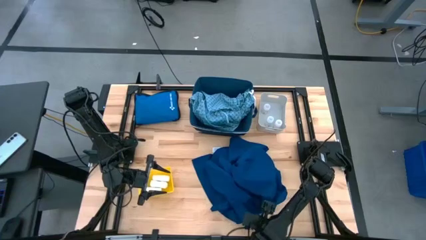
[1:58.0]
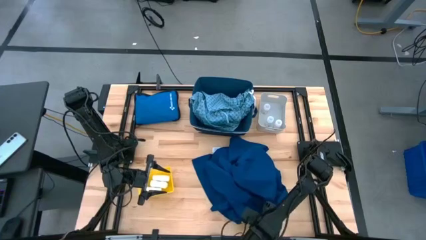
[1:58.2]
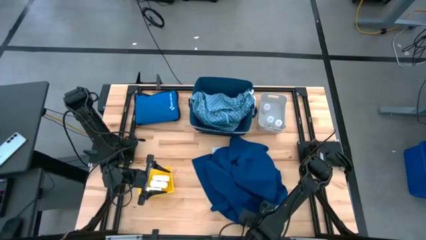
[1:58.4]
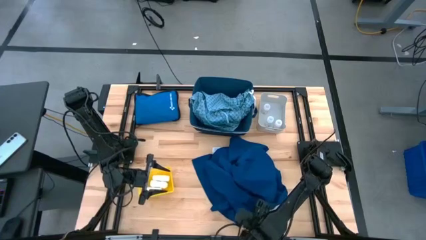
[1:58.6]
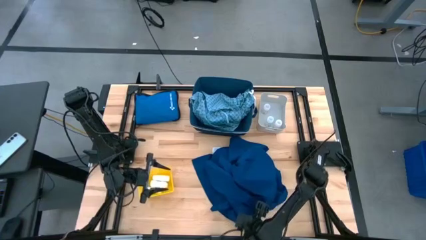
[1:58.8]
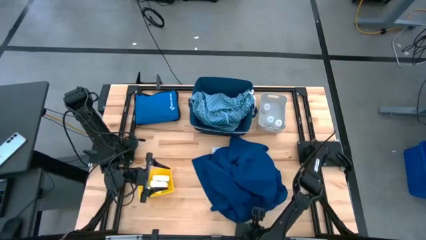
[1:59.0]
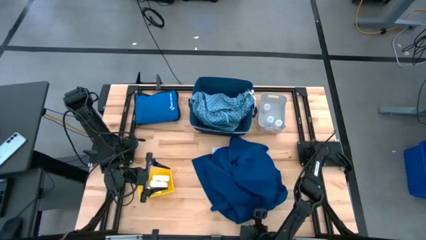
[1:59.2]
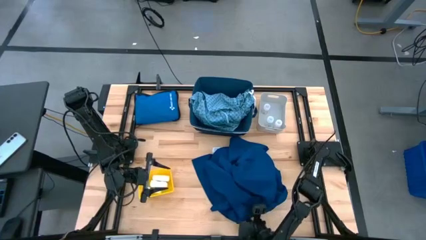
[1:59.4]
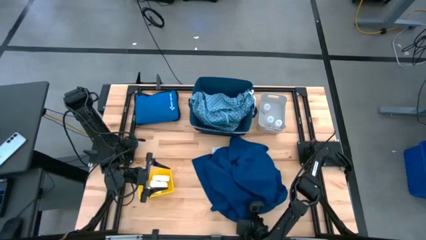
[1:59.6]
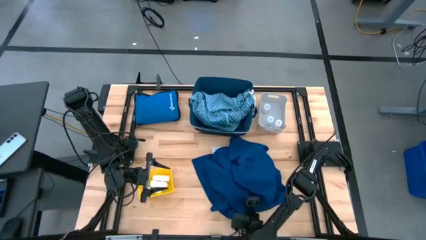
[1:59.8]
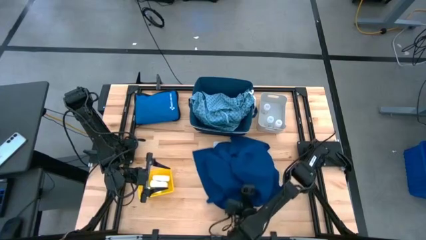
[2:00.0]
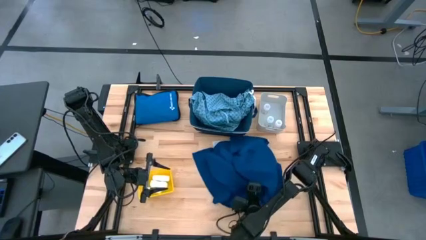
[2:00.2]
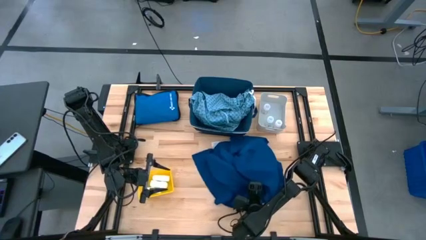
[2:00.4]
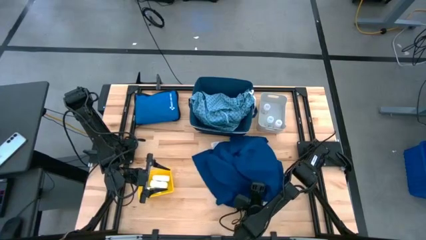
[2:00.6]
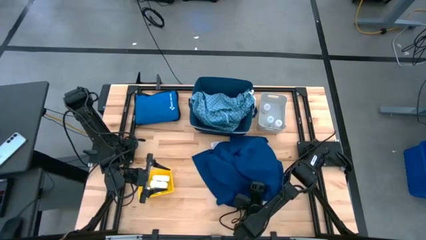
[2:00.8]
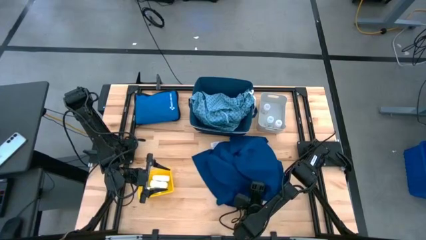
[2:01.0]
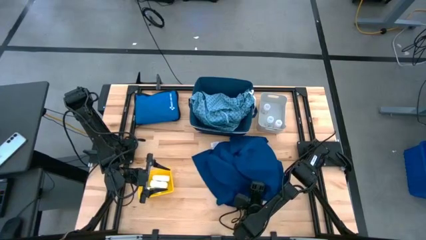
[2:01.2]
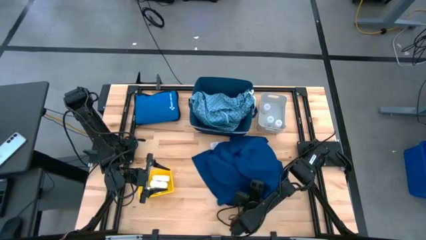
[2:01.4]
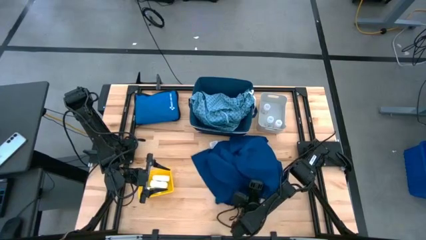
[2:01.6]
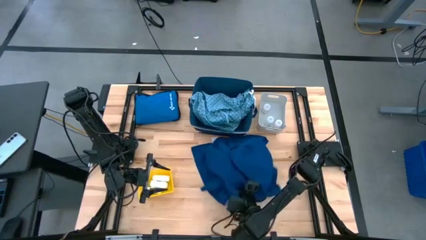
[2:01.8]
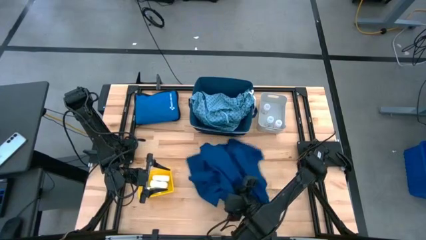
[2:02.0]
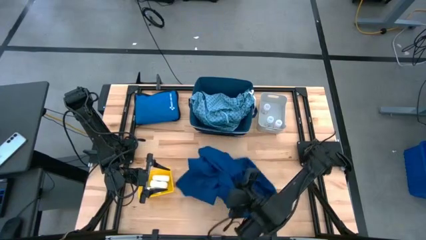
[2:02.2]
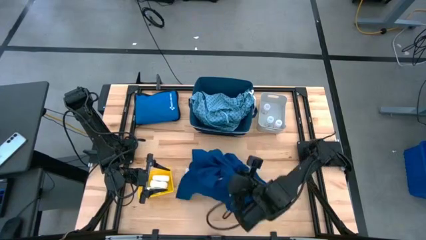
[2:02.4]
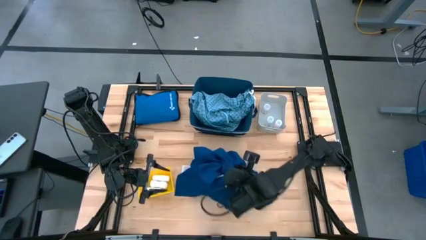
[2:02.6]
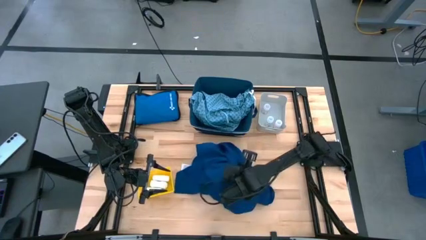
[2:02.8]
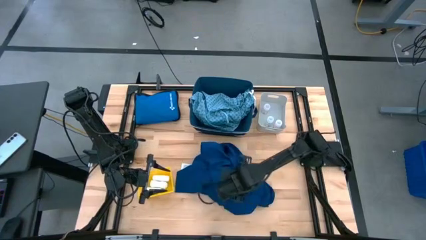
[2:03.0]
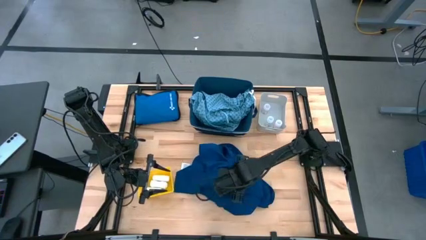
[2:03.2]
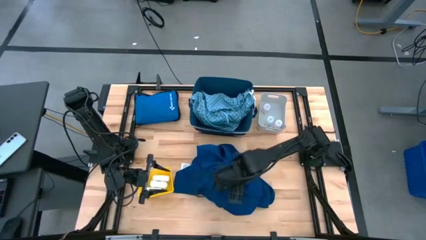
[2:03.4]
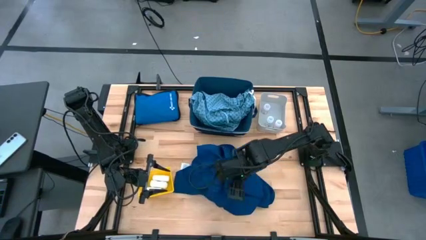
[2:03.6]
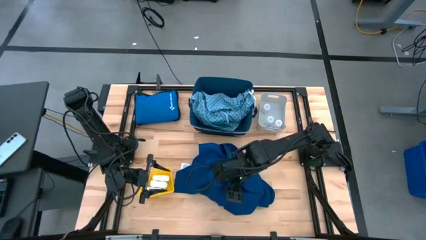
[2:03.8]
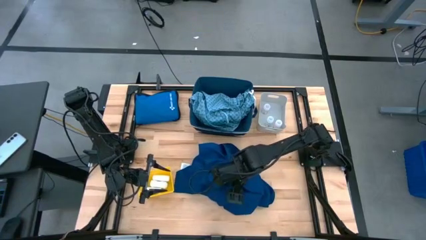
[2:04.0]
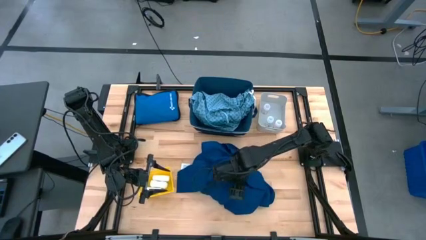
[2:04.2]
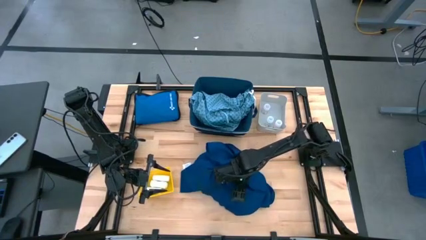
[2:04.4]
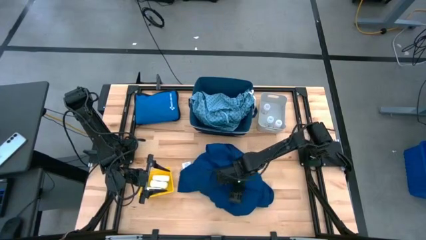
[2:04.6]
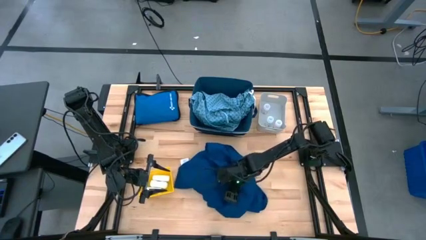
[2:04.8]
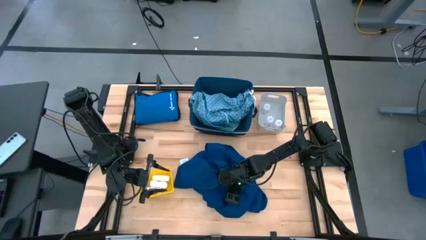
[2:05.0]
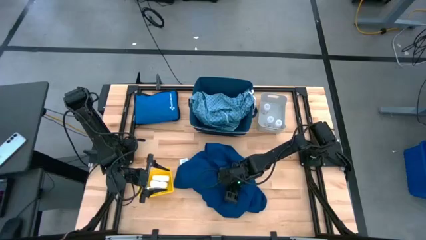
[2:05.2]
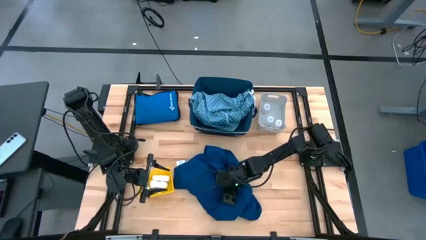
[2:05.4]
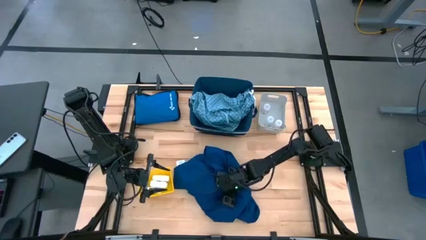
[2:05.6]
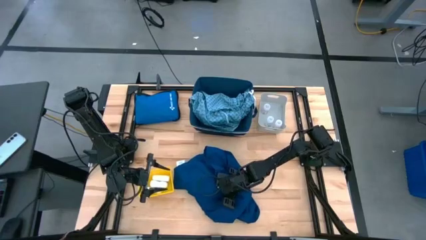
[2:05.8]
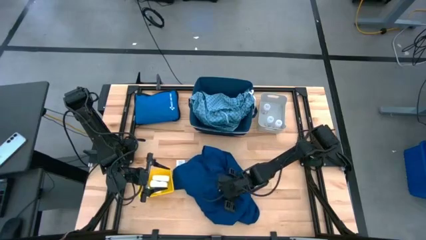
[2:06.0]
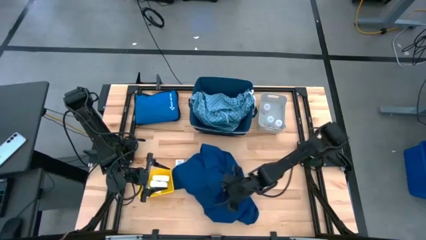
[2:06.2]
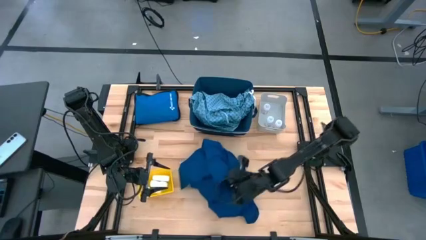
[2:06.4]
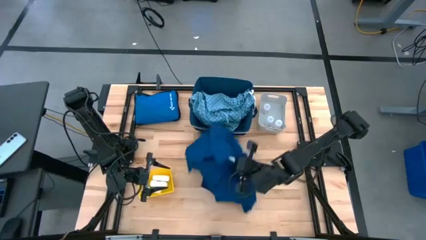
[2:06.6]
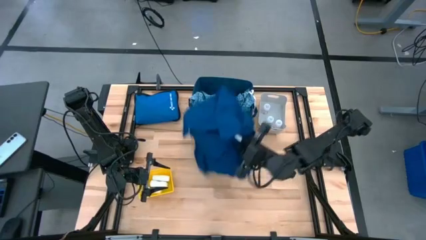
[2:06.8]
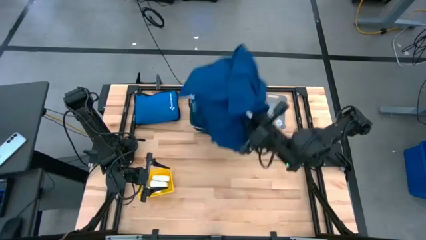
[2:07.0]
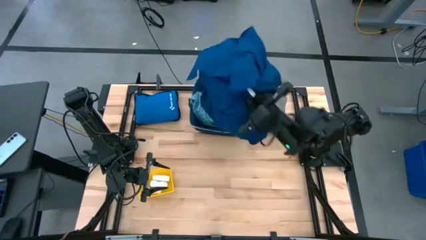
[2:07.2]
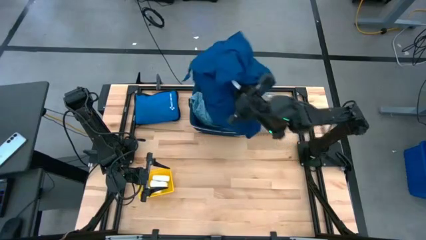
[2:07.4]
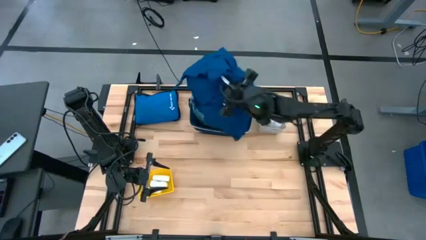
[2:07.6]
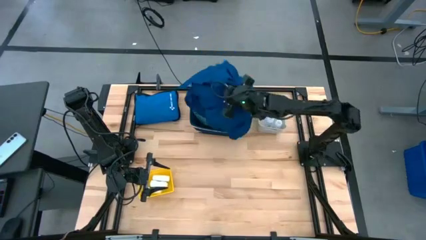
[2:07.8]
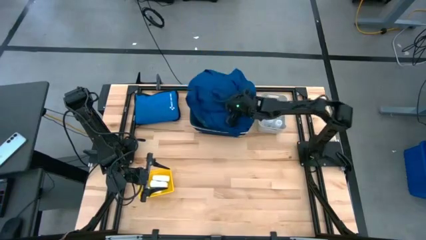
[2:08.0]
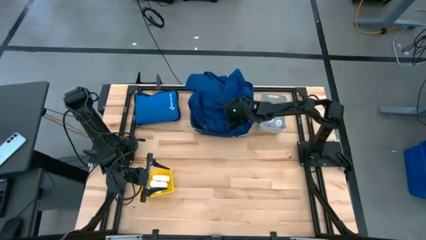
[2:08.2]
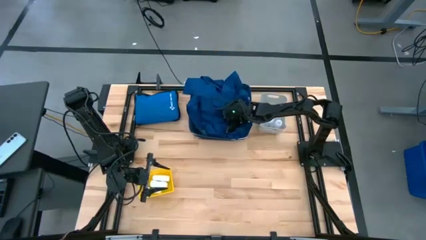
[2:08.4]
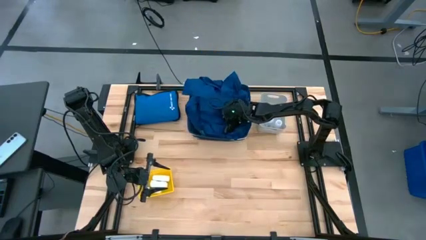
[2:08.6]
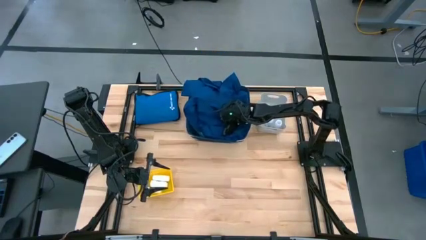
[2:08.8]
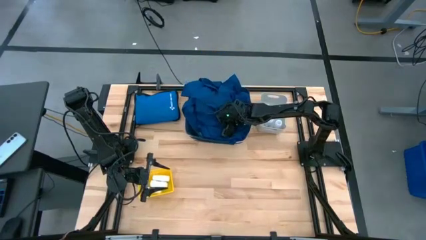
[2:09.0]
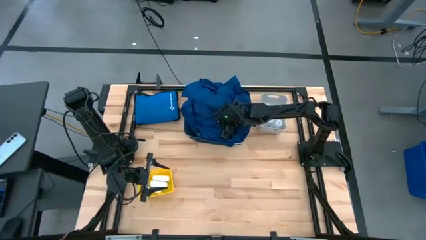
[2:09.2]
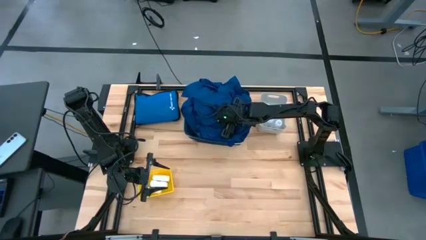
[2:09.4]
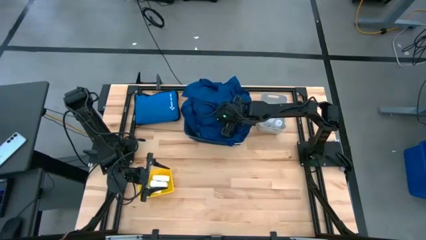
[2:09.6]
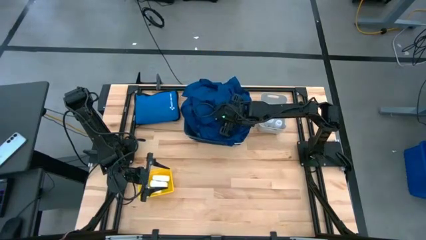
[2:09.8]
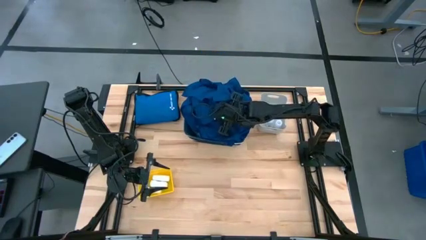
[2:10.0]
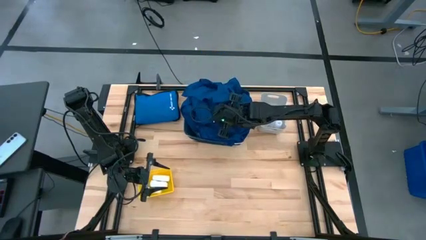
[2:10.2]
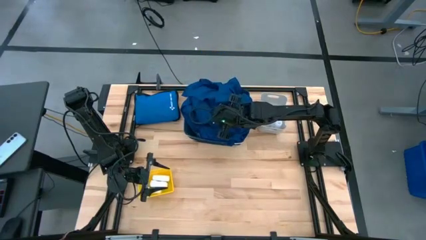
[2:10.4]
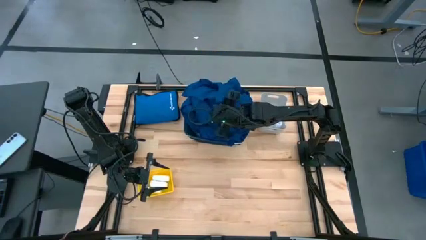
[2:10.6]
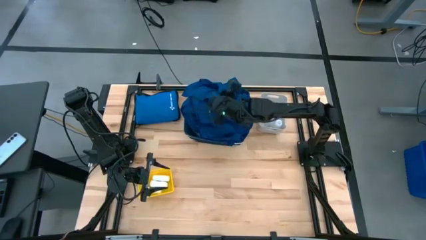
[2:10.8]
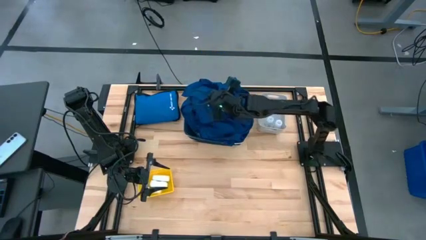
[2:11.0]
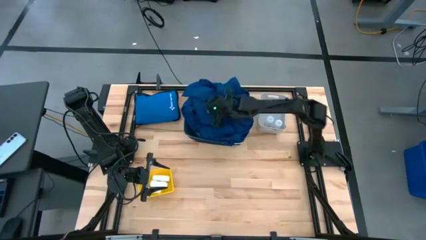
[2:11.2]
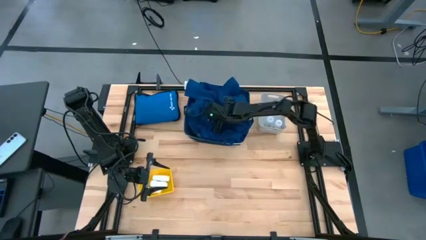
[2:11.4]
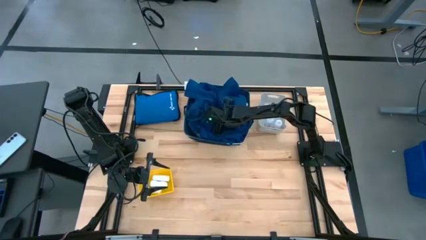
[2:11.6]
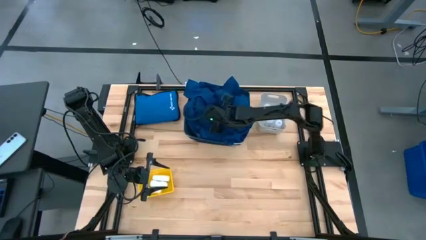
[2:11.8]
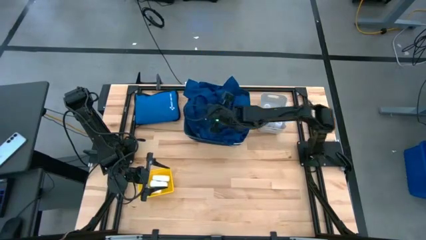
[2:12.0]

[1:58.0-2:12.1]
Task: Pick & Place Medicine items
Put the blue patient gown into the blue bin

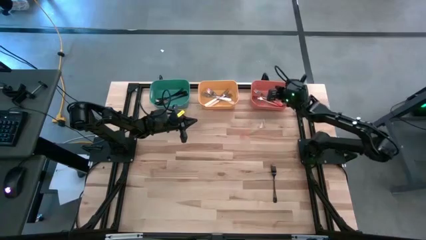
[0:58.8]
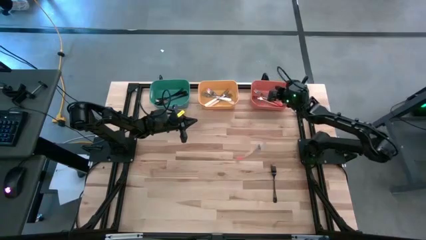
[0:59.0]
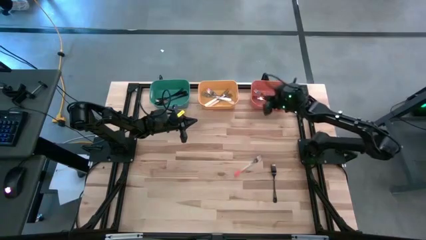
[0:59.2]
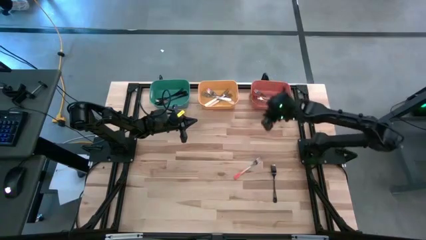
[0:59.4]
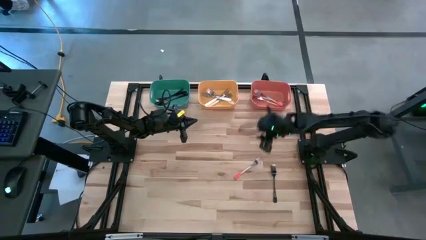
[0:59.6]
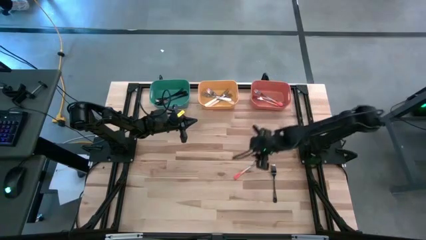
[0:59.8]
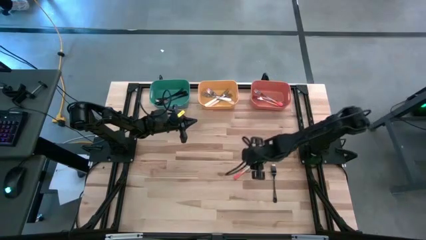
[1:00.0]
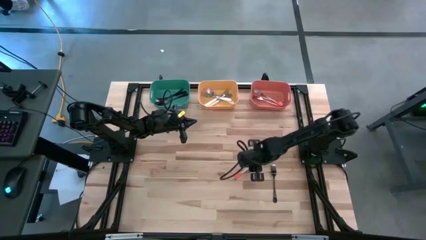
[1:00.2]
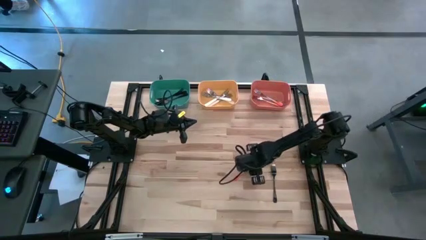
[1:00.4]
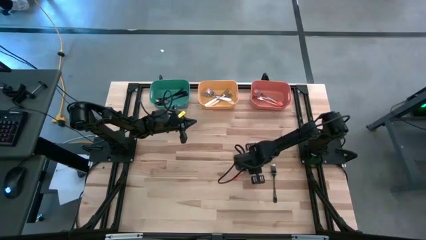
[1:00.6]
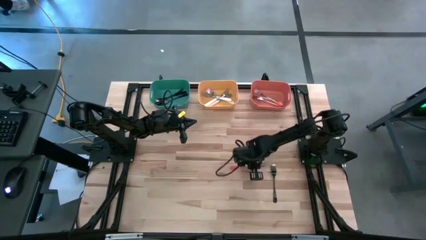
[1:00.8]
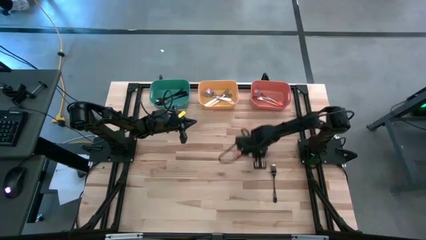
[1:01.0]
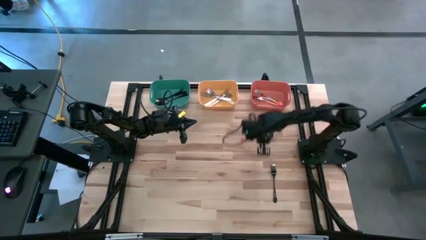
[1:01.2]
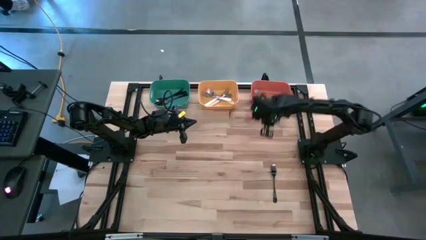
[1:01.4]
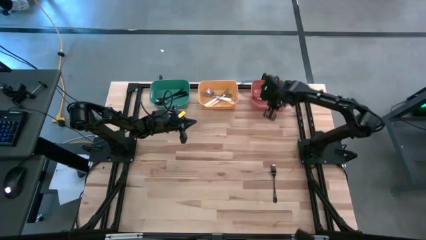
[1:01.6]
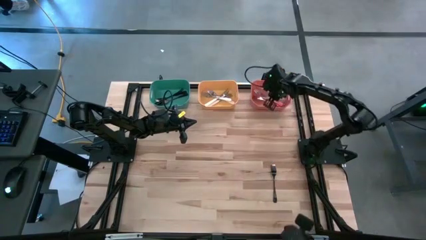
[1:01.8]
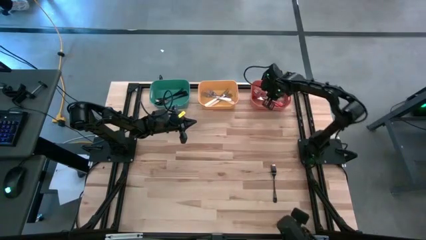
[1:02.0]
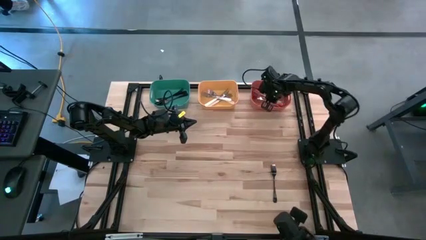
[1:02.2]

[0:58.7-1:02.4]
Task: Sort silverware by color (type)
Put the orange fork into the orange bin
